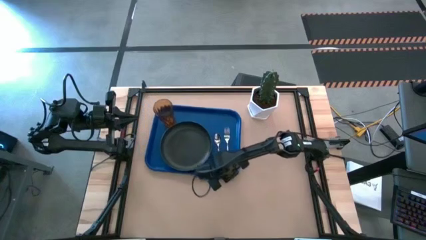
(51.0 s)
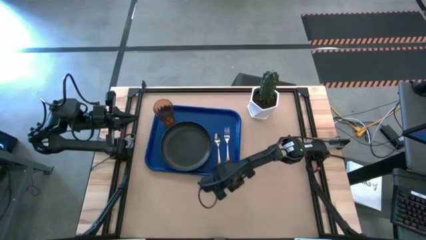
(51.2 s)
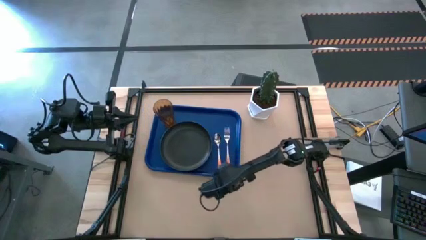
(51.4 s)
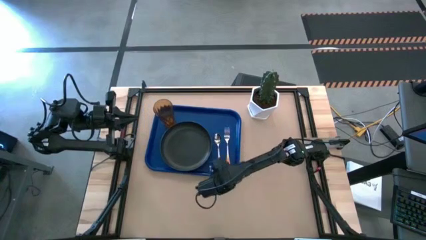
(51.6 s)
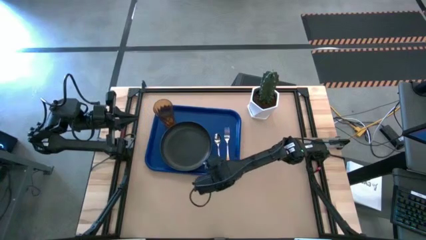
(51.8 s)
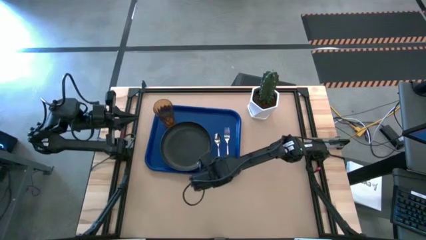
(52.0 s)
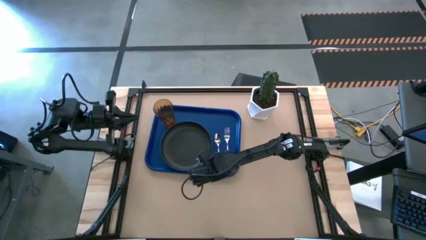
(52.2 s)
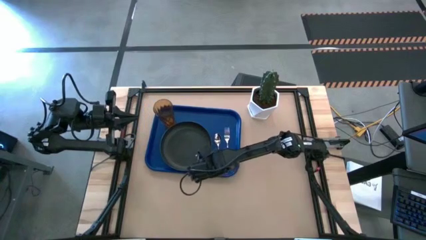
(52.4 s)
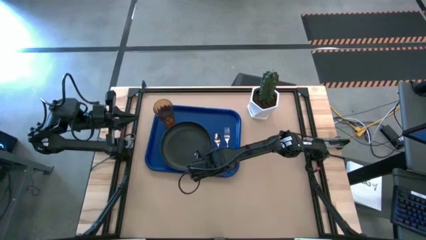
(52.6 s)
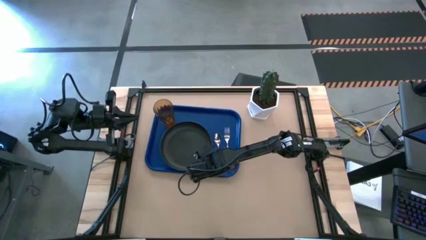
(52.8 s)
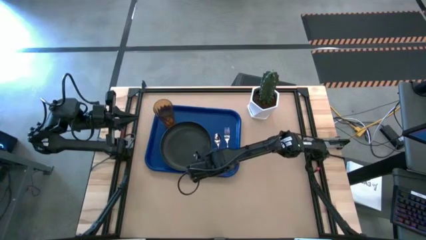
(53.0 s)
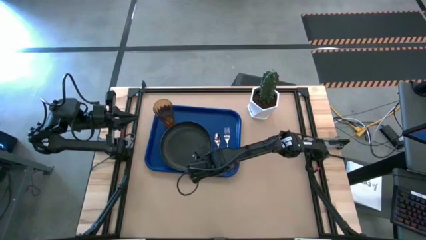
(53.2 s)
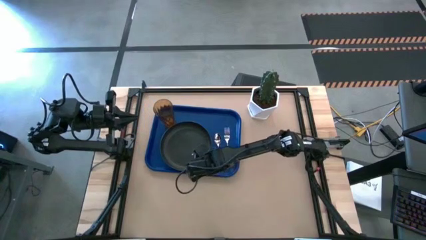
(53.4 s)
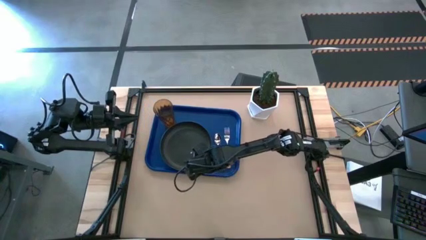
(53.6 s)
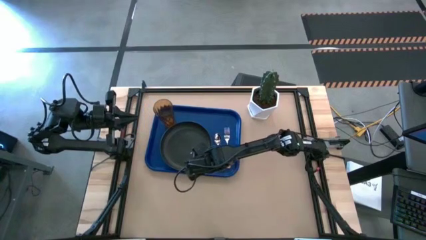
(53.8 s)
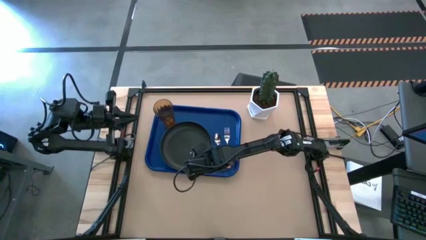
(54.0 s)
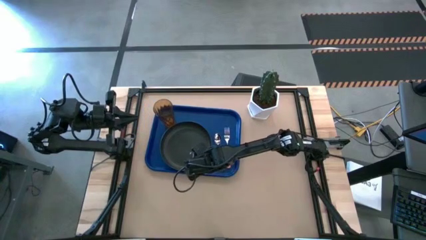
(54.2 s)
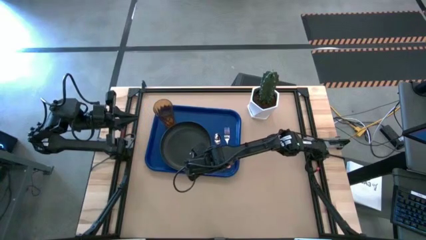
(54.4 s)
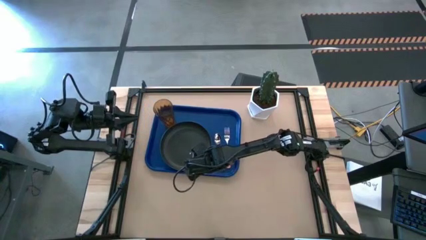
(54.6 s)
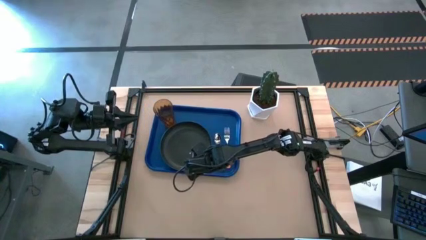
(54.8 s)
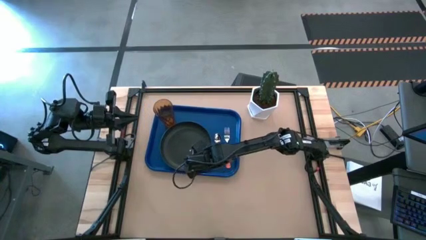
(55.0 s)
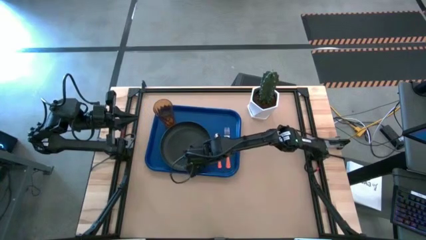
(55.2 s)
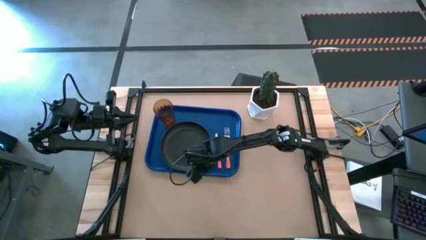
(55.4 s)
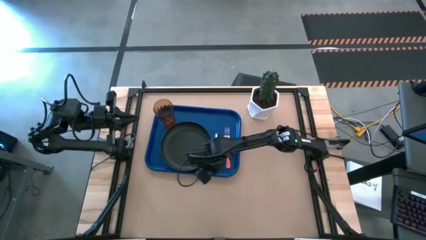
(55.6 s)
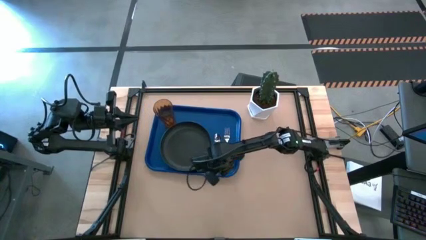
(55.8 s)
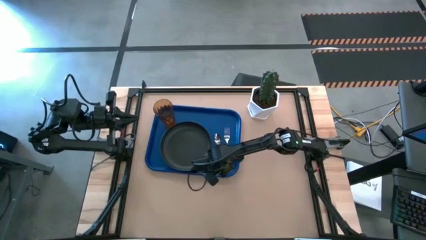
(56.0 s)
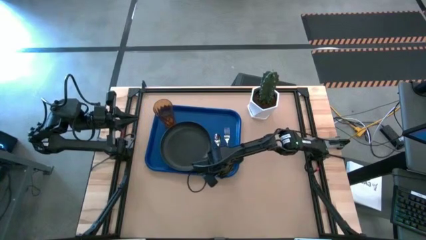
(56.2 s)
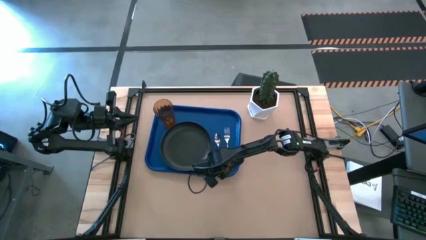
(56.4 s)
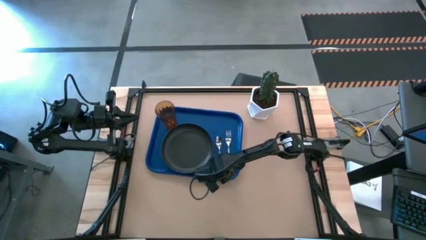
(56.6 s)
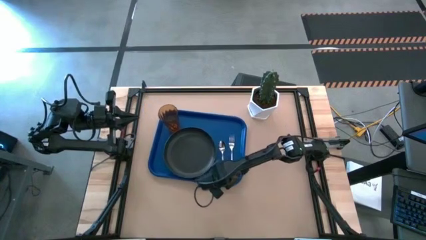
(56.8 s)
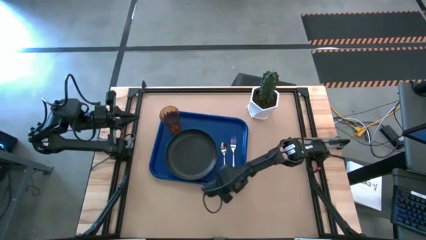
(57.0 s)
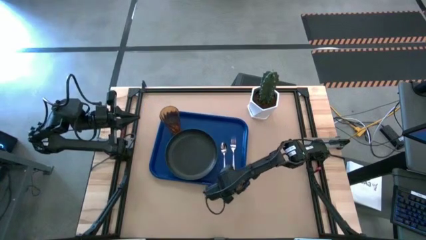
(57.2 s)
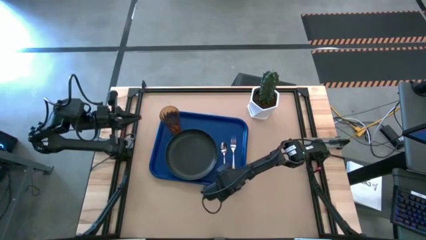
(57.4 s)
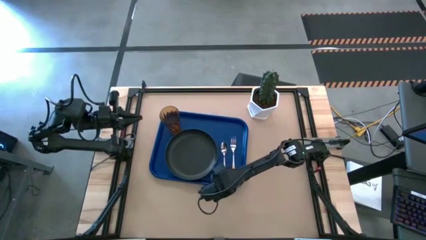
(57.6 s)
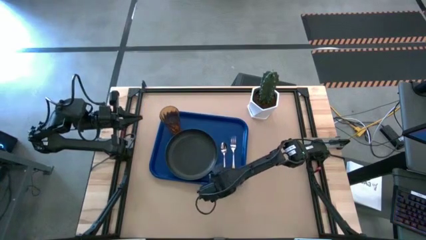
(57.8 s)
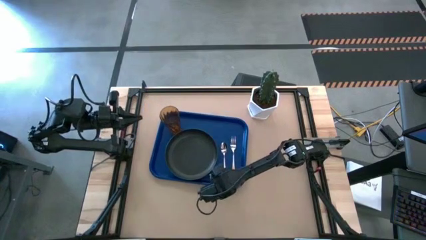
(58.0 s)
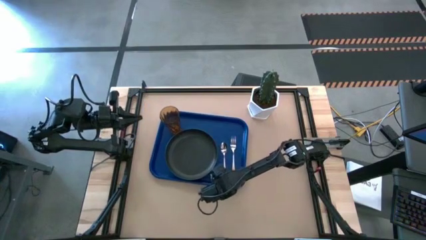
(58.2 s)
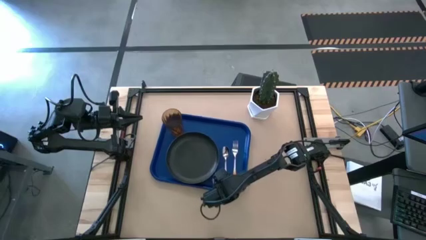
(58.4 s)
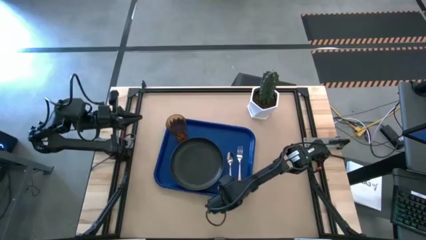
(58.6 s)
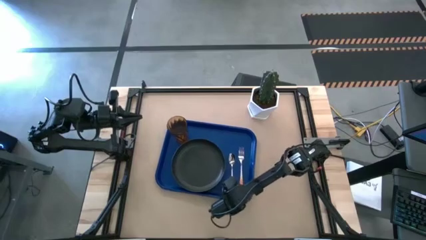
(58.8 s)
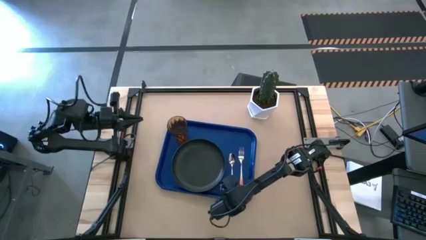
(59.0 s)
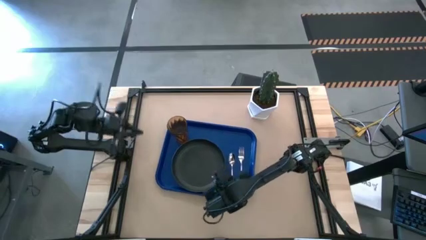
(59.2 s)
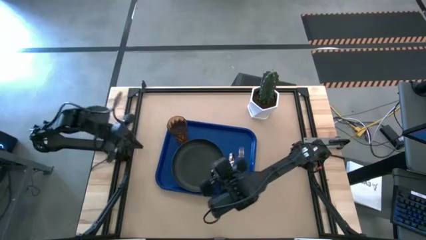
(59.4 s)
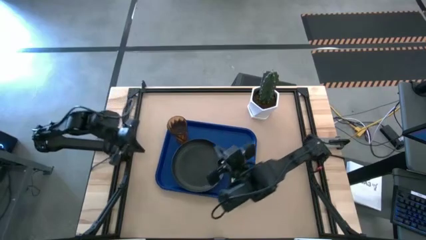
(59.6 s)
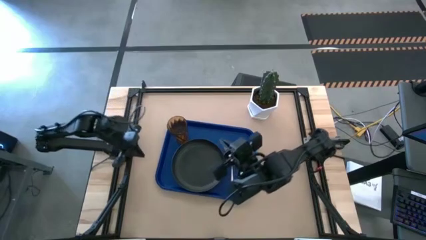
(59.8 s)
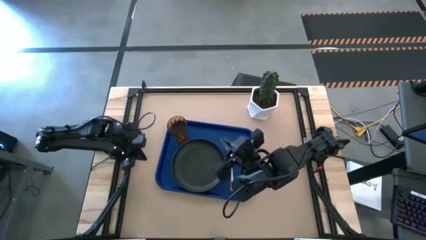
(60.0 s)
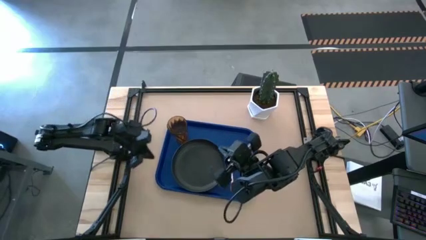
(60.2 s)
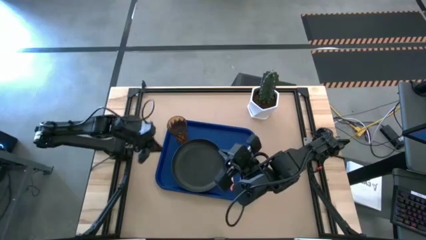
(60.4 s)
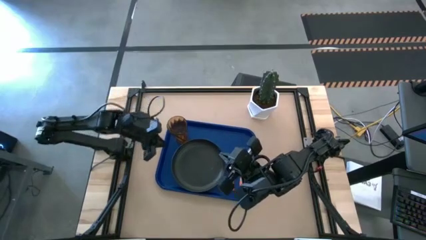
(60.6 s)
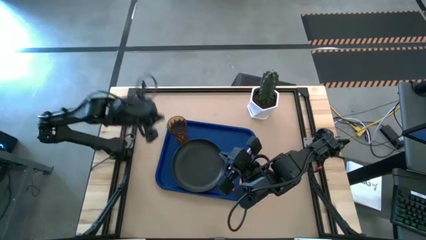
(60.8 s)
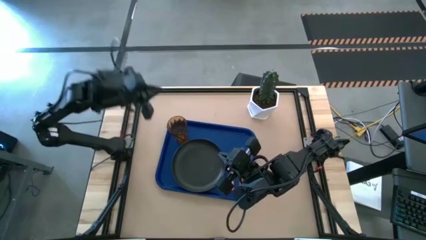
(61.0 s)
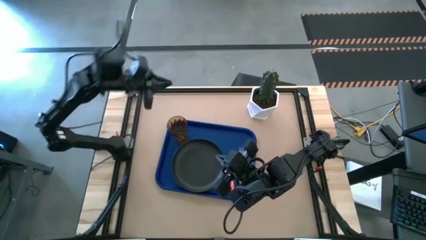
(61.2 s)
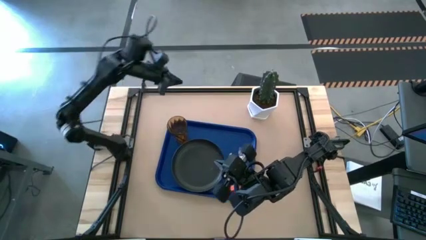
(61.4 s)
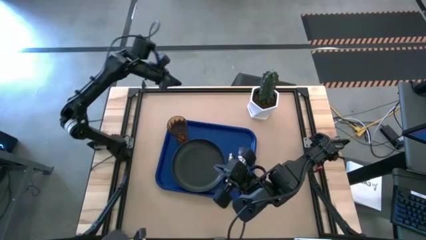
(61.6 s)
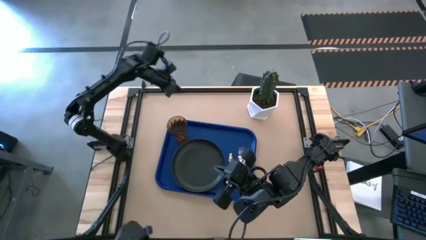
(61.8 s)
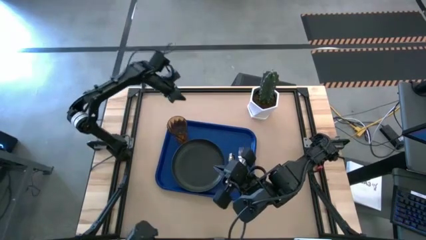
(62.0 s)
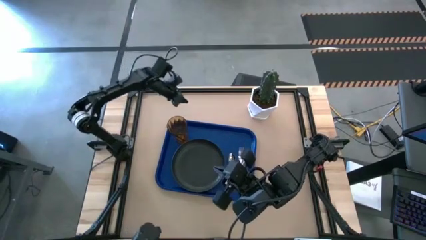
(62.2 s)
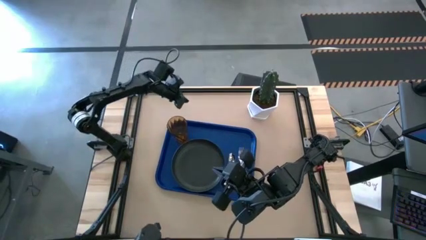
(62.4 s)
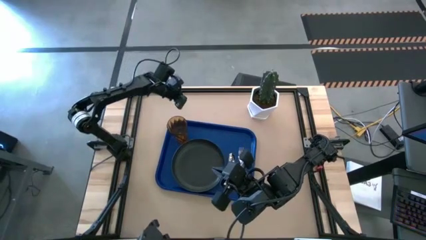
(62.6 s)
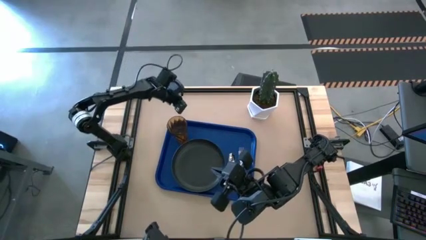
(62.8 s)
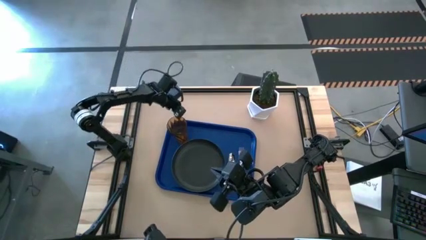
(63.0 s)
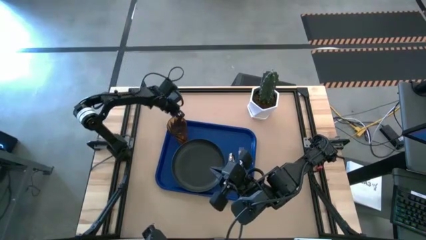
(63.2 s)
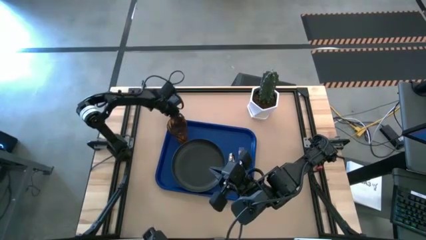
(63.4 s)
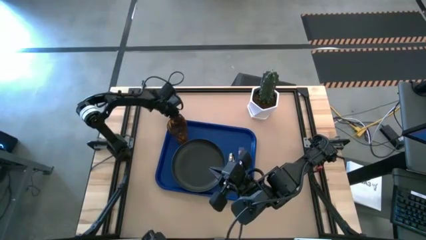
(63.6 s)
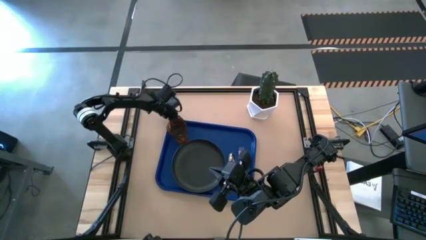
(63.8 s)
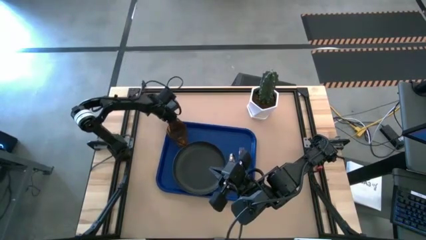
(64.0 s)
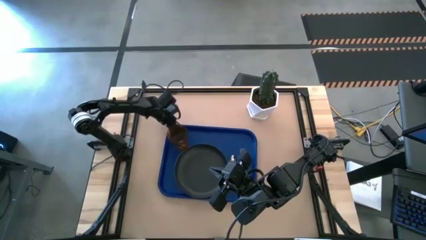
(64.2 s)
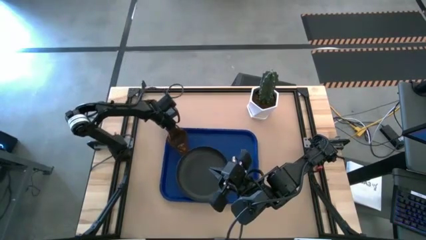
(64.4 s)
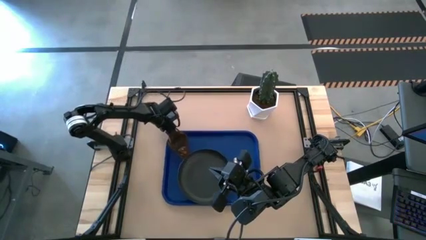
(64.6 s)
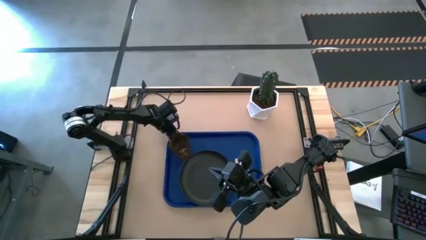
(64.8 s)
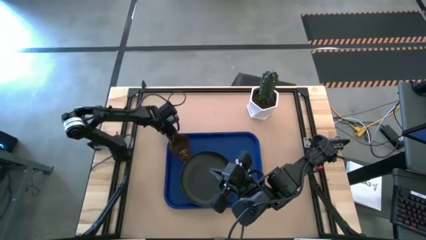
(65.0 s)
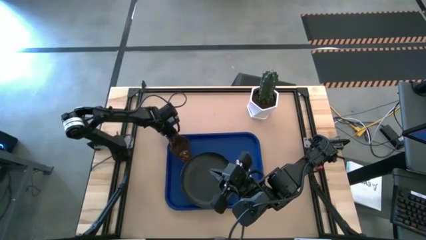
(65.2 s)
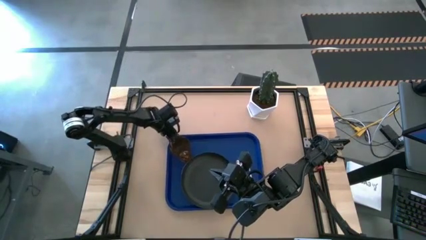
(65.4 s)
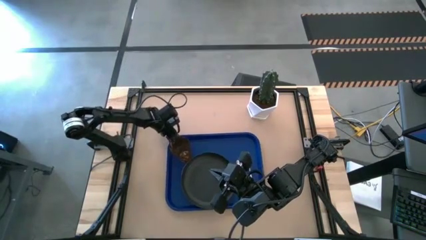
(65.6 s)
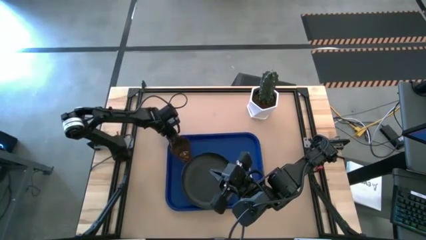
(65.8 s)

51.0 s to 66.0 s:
Task: Pick and place plate/cup/fork/spoon on tray
Move the blue serving tray to the center of the table

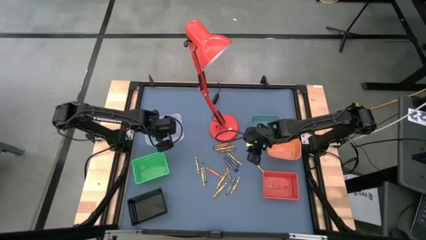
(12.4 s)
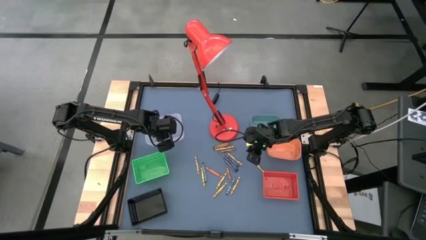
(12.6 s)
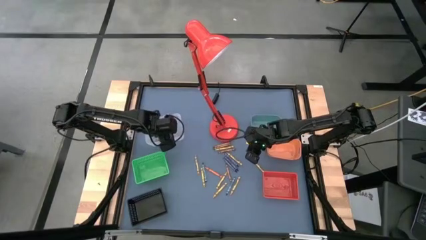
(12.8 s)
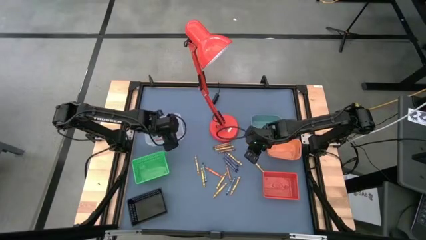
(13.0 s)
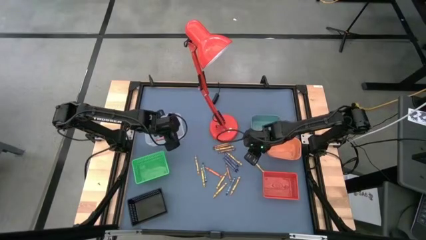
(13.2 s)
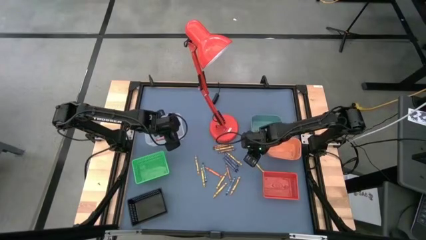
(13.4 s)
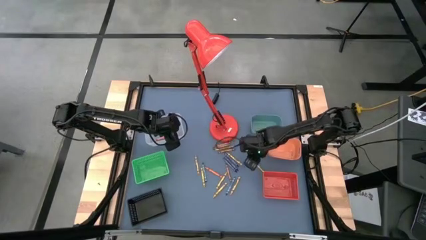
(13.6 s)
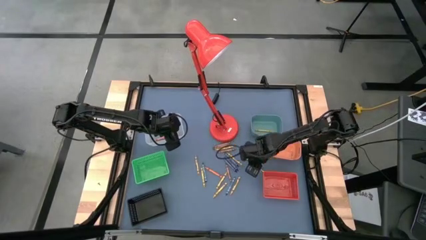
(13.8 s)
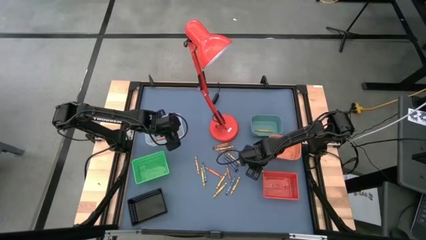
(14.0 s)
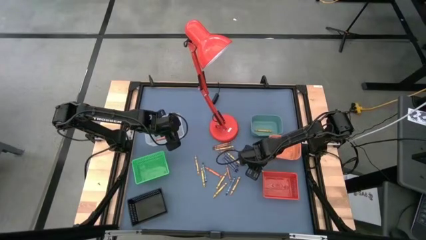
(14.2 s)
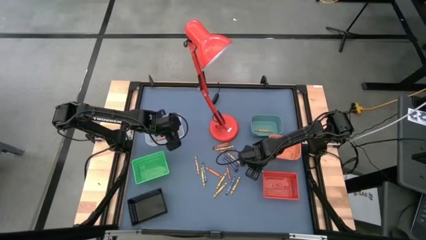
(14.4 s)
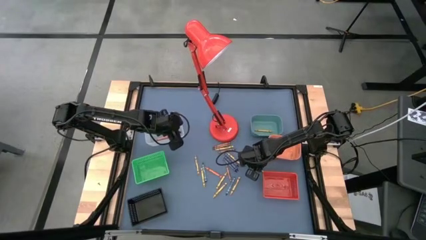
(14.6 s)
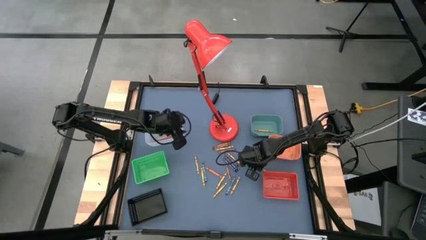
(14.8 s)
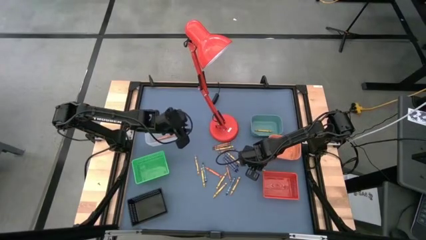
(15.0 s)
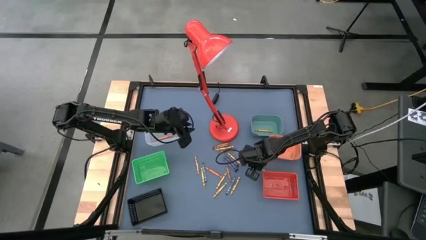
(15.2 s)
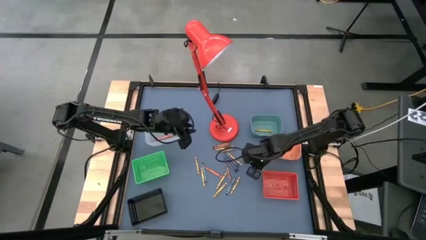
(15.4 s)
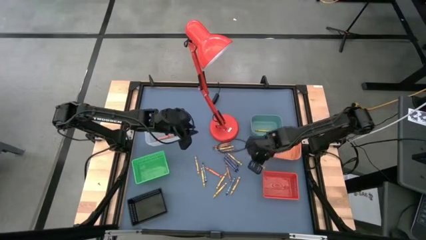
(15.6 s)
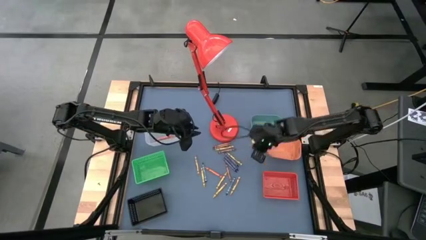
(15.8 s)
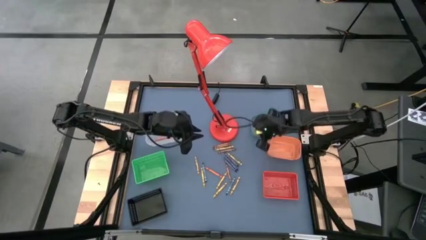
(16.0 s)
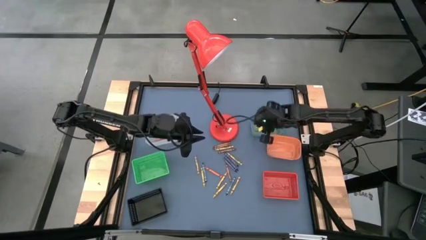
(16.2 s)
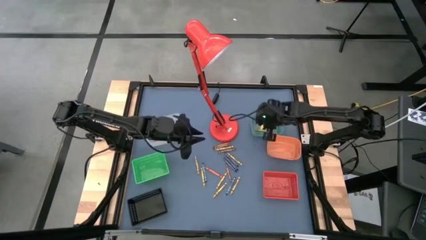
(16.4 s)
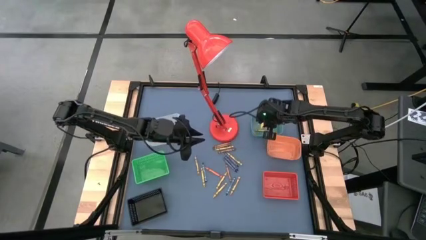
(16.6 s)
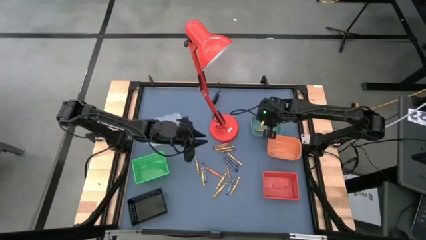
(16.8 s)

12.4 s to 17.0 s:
Task: Sort crayons
Put the yellow crayon into the blue bin
